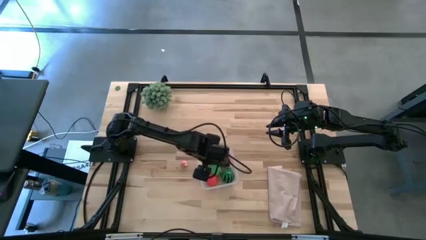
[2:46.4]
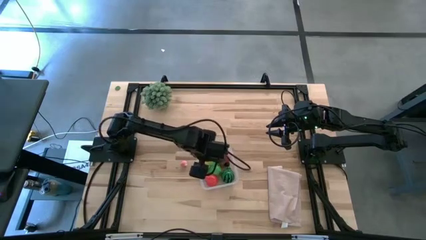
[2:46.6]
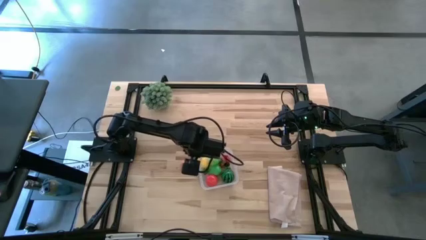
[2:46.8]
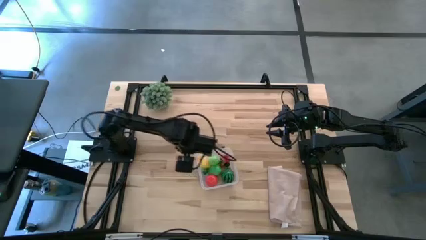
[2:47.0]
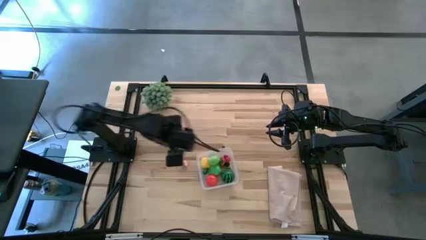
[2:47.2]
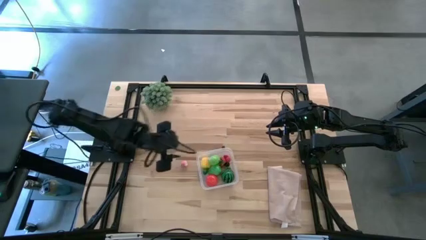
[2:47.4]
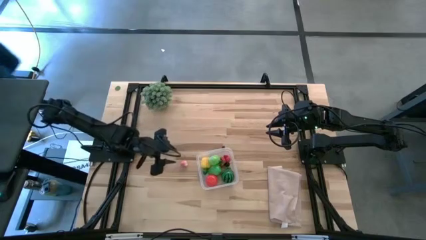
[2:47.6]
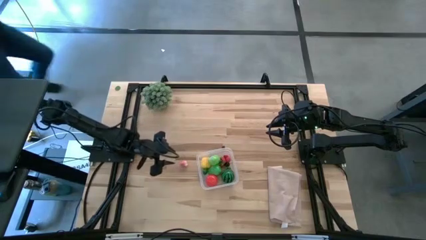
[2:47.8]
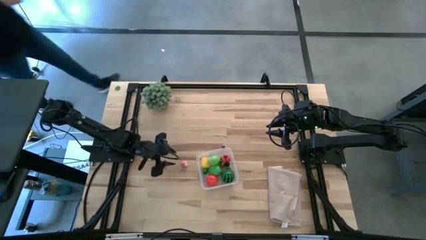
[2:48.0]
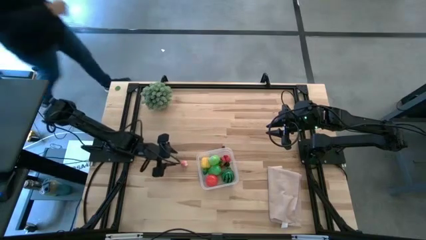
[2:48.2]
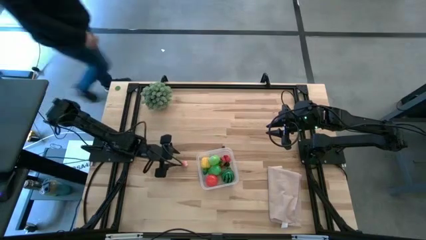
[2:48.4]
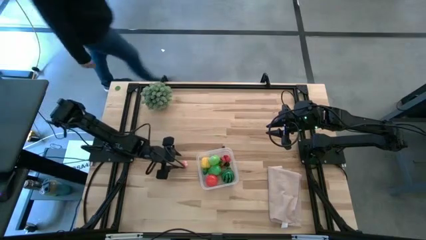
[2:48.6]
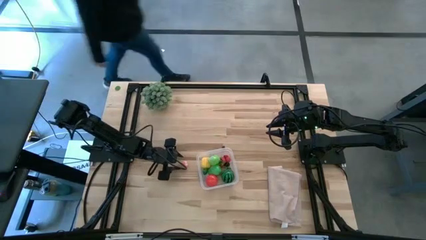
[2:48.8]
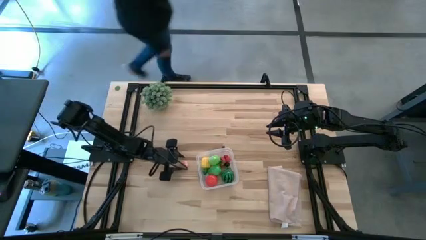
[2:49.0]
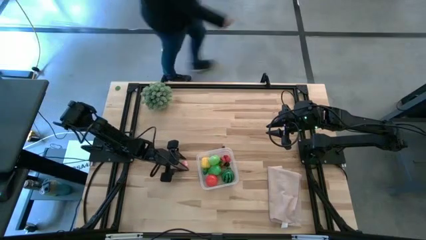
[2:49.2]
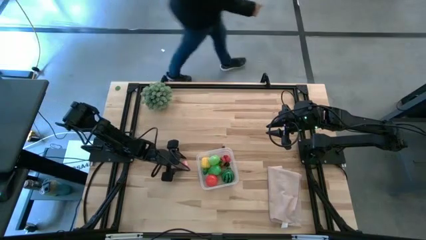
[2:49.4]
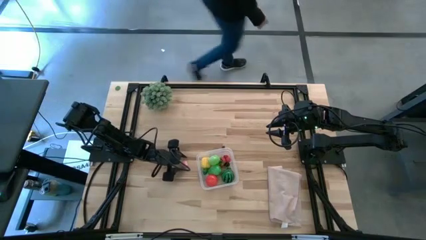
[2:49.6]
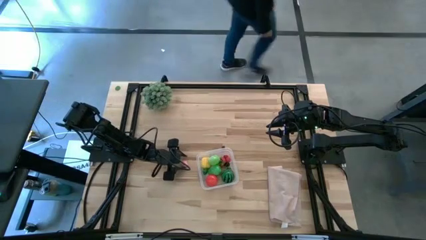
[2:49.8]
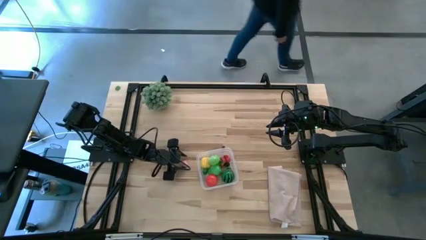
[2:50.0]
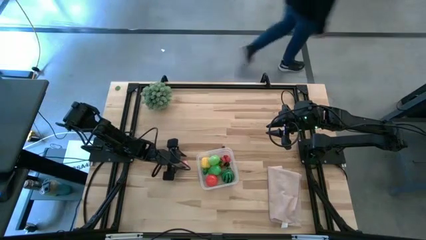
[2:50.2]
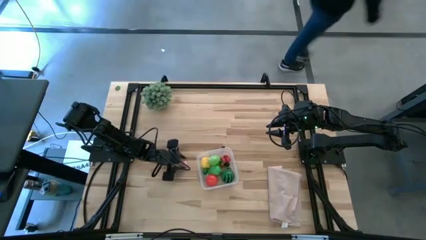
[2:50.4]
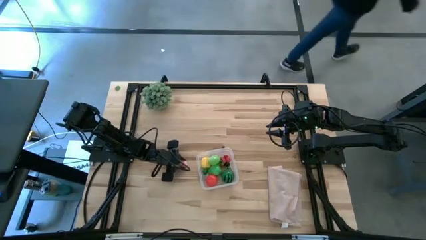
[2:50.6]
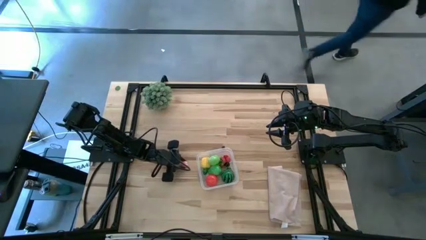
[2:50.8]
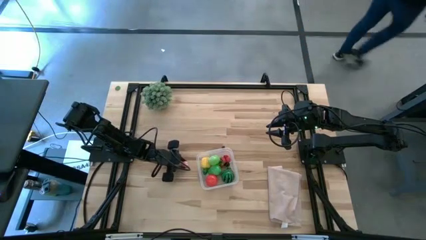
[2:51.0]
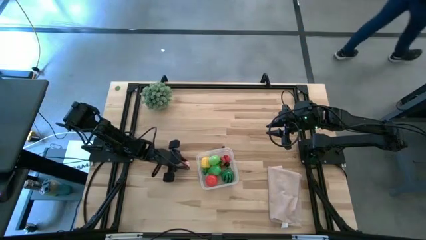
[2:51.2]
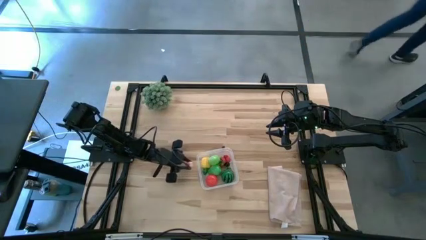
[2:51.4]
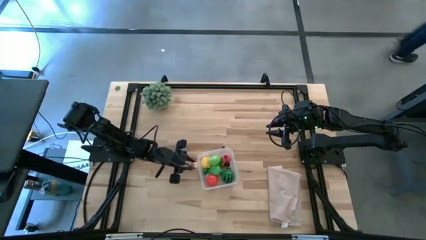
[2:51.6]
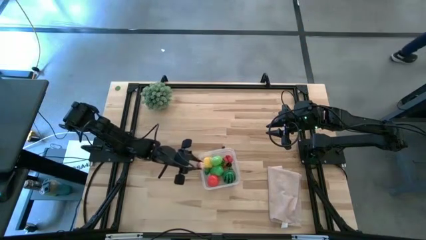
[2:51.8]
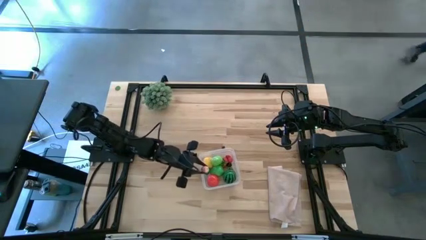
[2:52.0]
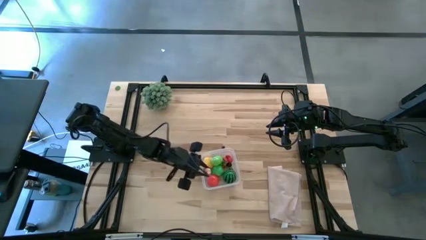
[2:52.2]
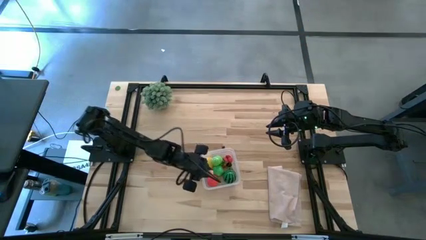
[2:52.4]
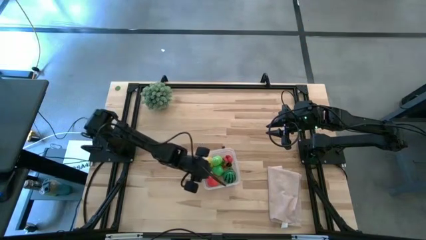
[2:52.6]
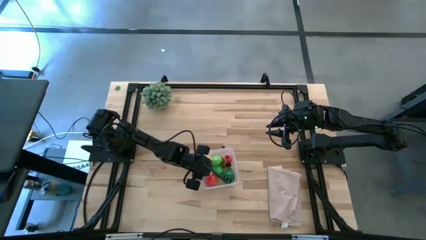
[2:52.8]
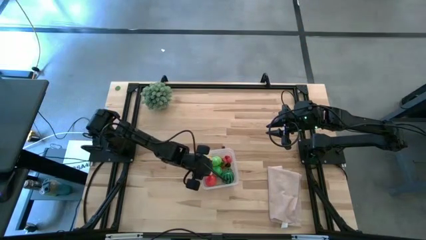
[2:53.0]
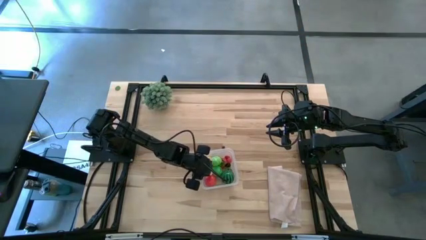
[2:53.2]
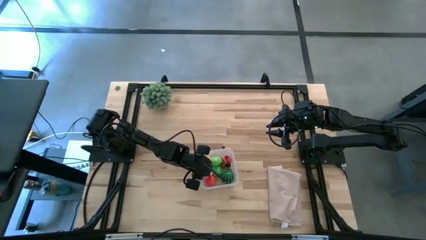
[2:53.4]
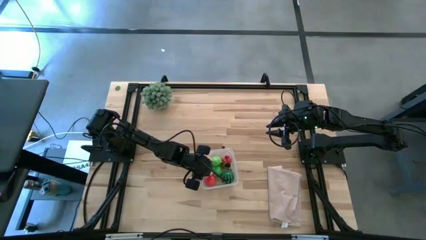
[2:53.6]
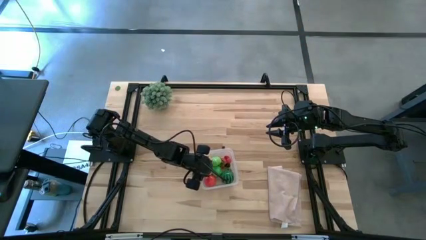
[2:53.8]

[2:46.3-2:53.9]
Task: Pick and placing Produce into tupperware
Put the pink peach into the transparent bin

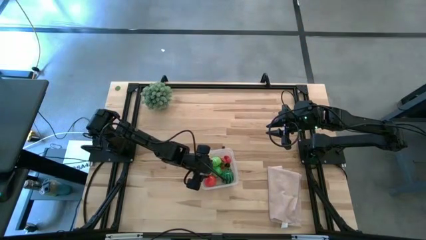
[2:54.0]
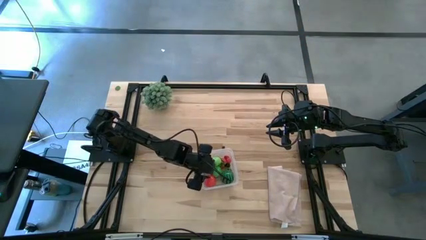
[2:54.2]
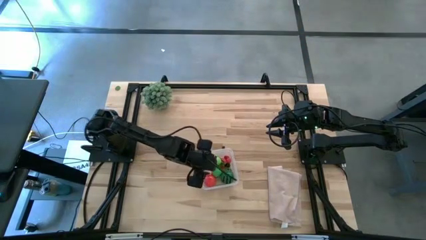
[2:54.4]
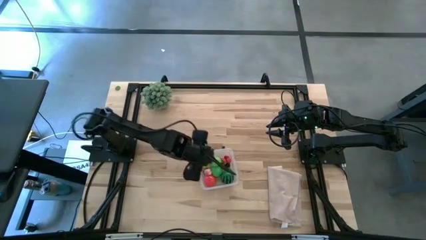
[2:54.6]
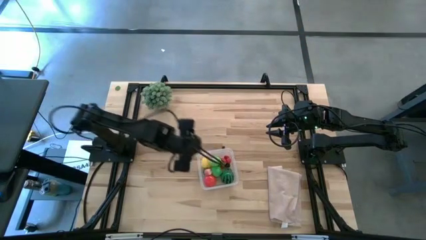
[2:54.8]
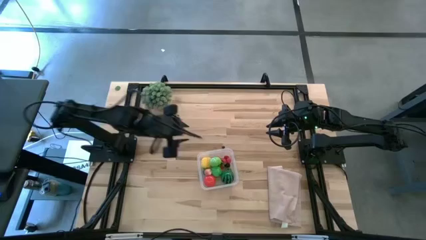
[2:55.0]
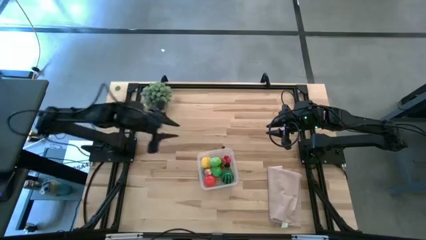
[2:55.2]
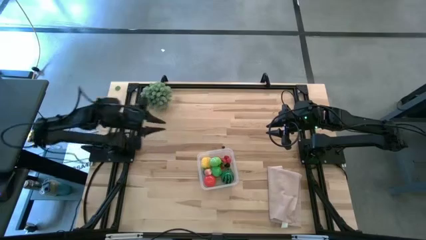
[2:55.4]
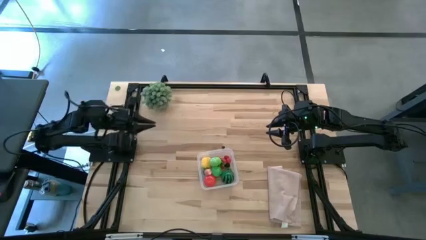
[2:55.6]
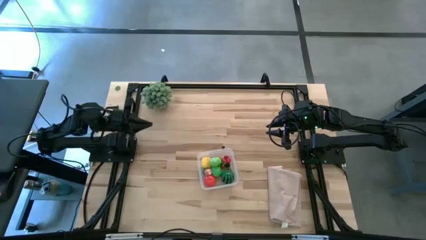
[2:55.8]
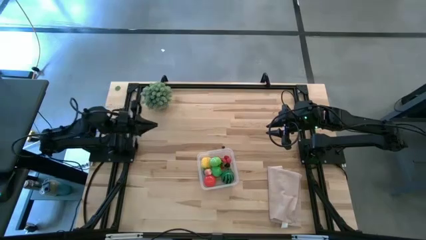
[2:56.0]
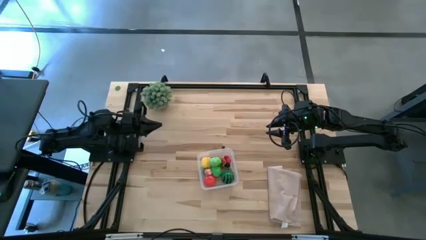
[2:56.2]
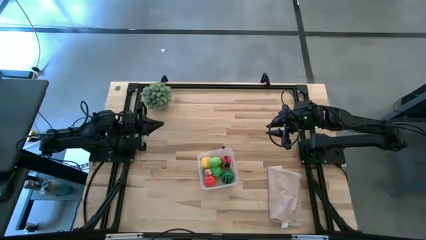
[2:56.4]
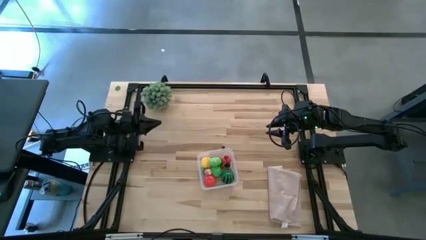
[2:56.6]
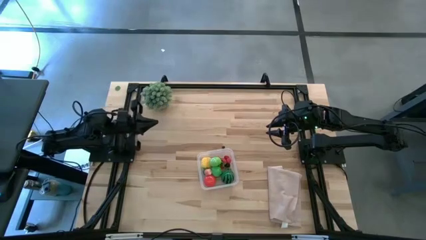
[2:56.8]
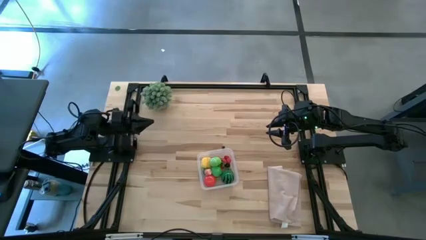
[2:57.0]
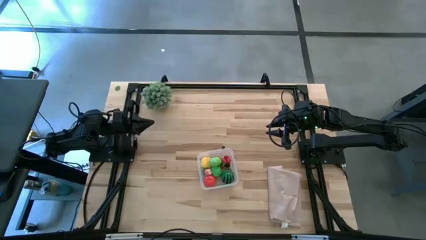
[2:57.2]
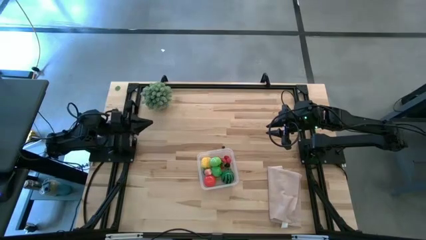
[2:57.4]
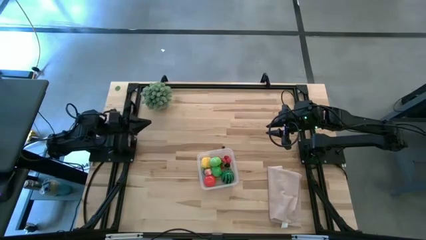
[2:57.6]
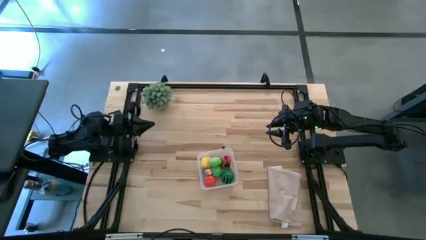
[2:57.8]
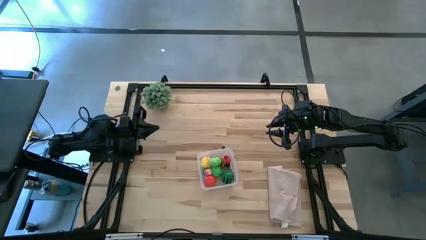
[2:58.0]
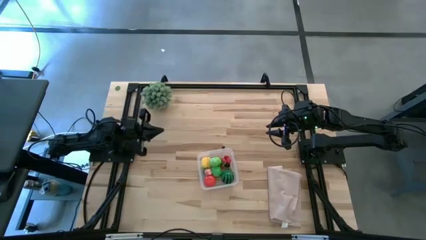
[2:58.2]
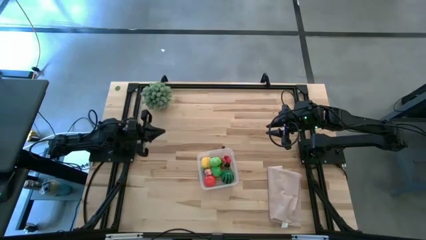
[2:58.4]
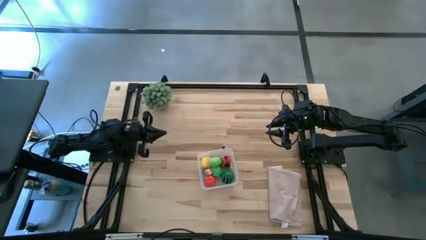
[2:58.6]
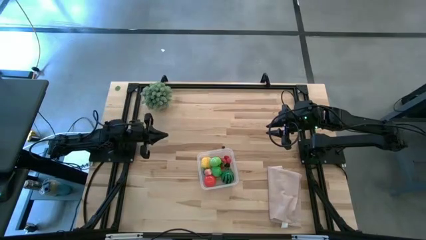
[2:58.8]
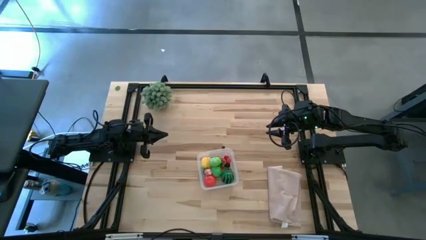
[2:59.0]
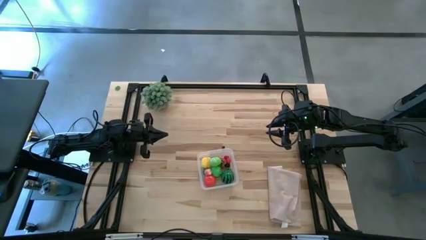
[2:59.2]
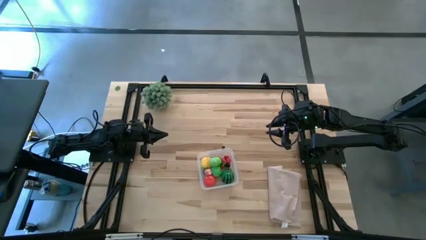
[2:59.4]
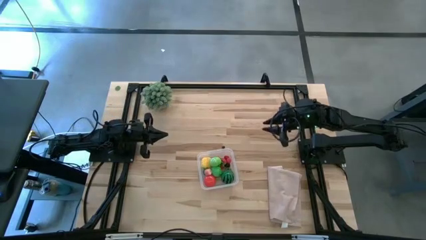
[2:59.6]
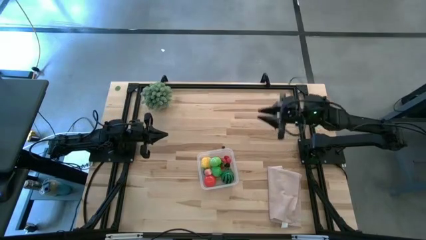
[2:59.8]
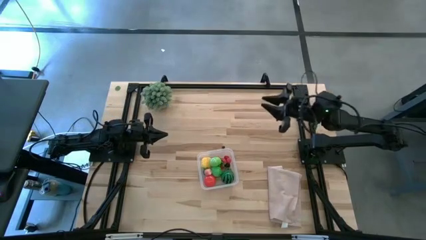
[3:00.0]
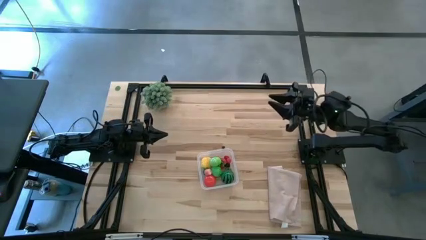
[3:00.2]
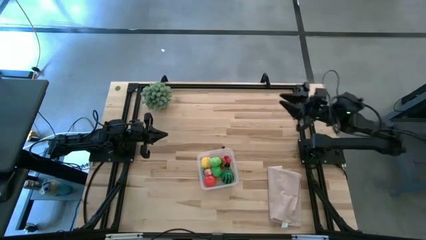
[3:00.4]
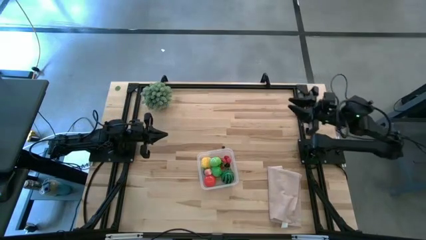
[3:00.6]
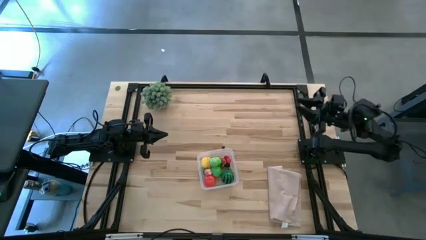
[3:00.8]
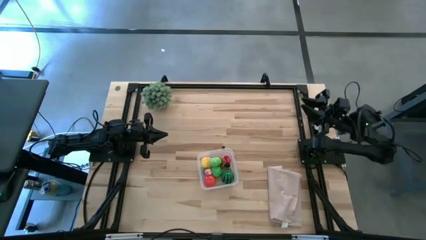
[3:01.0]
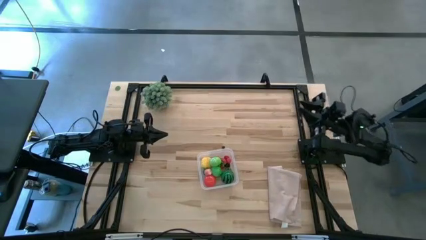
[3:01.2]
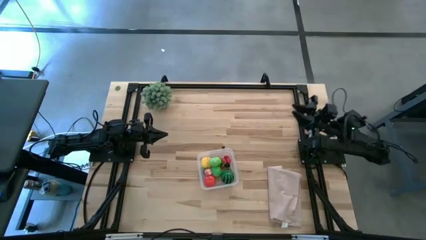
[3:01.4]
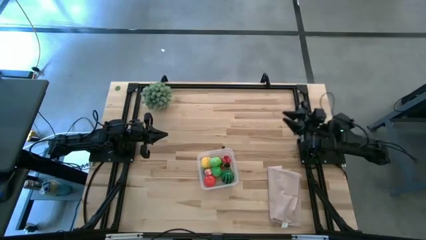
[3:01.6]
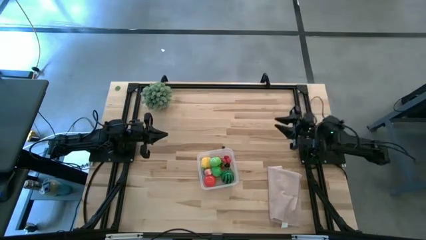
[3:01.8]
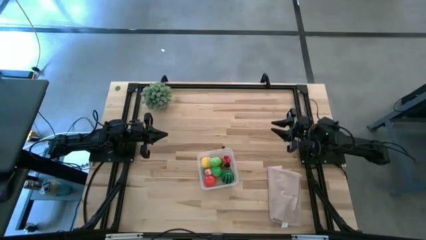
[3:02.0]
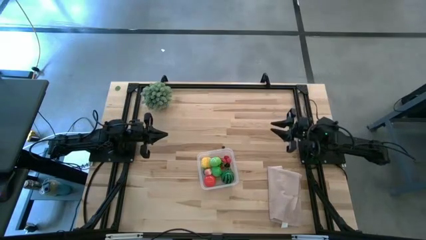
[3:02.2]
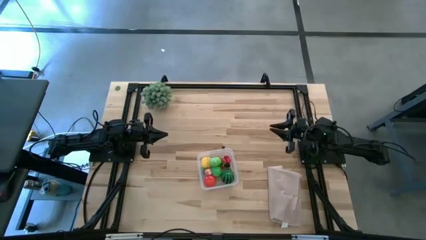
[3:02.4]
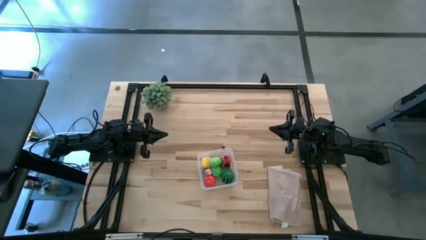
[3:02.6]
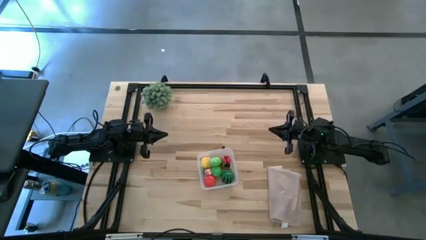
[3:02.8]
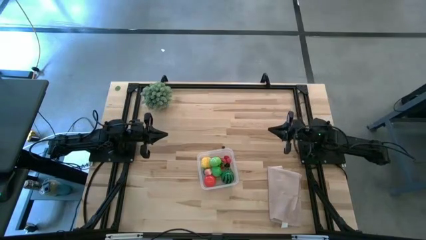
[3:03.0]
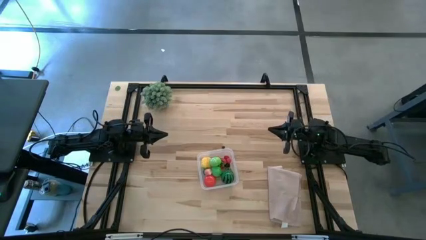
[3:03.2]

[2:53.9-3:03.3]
Return to Home Position
